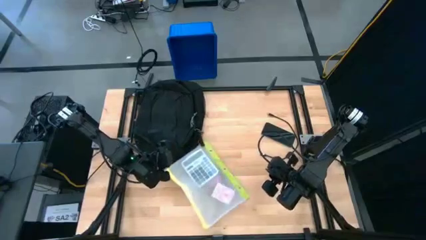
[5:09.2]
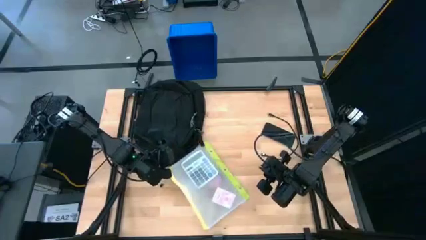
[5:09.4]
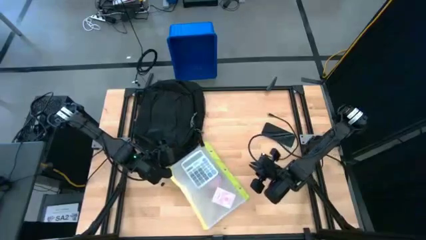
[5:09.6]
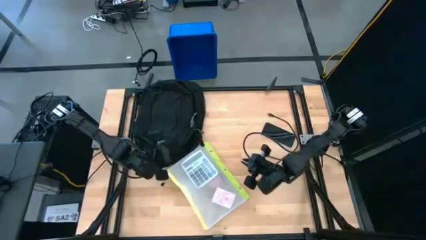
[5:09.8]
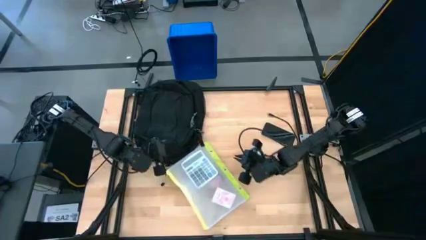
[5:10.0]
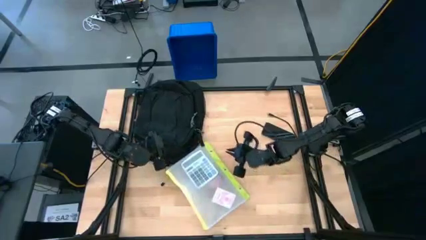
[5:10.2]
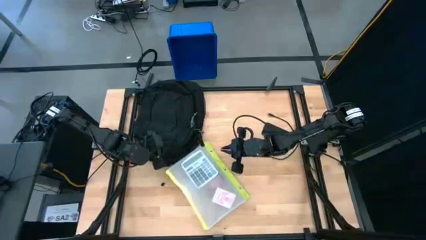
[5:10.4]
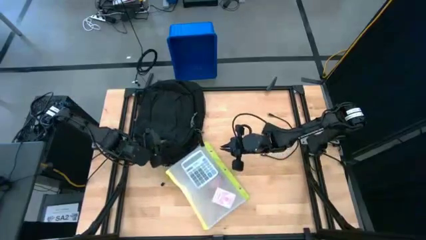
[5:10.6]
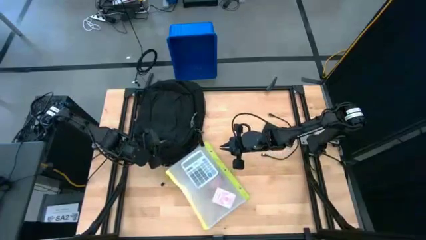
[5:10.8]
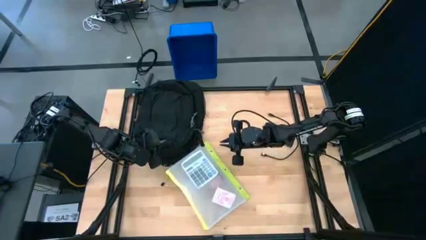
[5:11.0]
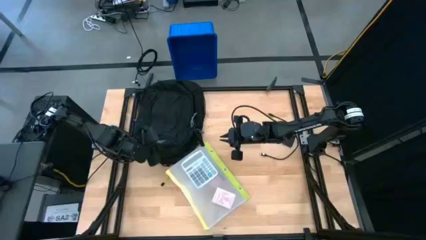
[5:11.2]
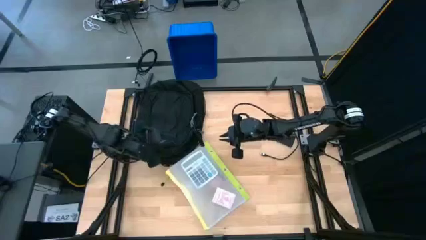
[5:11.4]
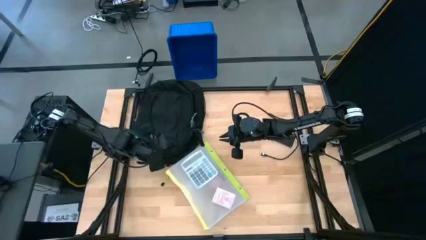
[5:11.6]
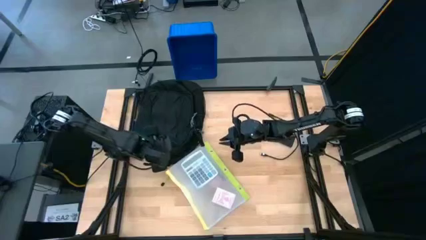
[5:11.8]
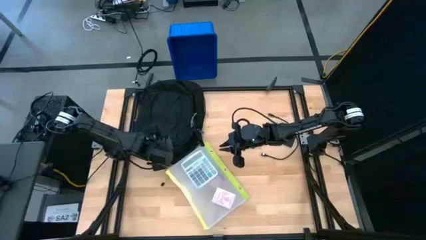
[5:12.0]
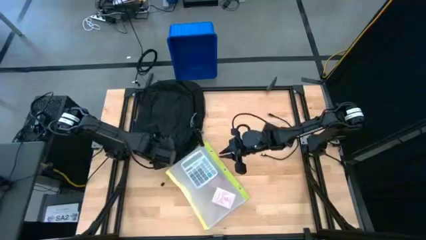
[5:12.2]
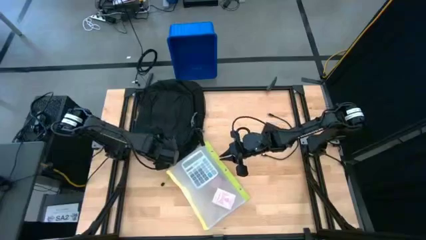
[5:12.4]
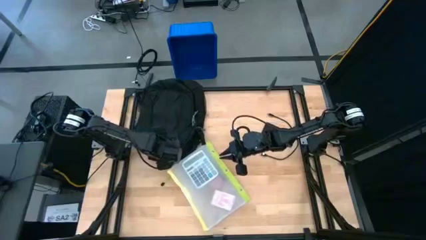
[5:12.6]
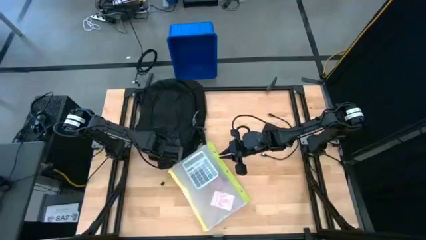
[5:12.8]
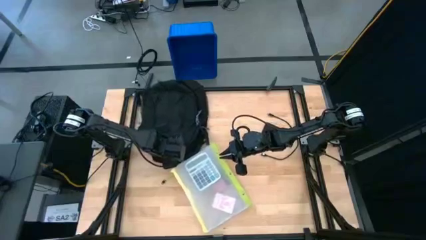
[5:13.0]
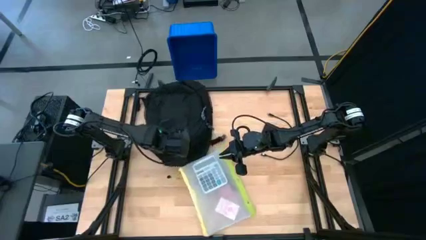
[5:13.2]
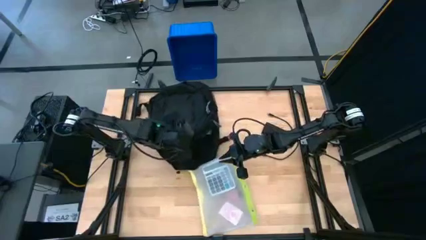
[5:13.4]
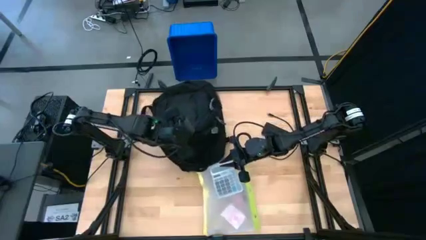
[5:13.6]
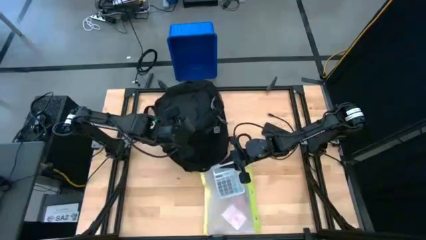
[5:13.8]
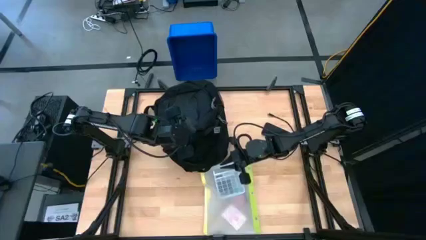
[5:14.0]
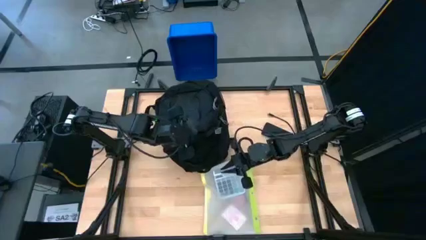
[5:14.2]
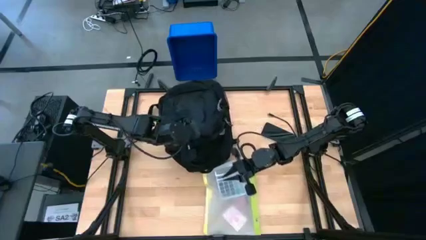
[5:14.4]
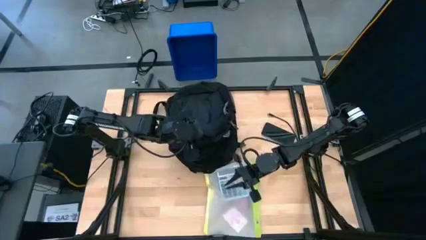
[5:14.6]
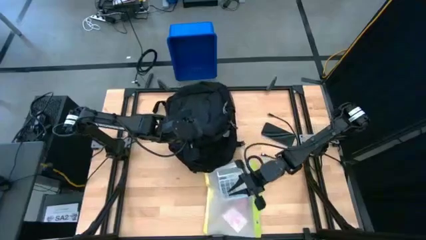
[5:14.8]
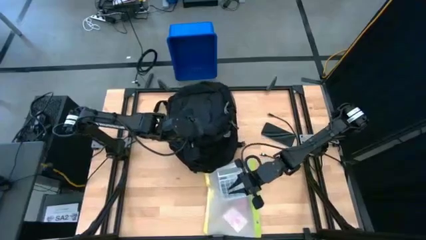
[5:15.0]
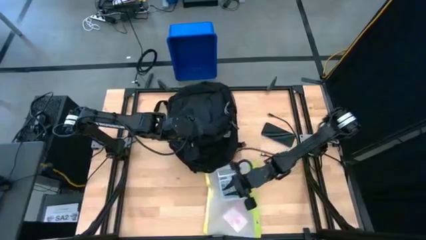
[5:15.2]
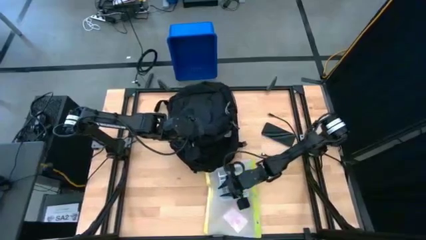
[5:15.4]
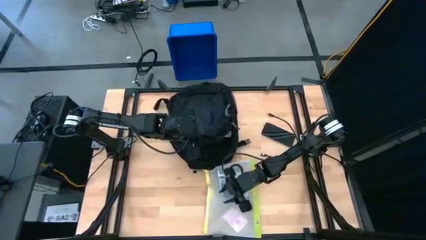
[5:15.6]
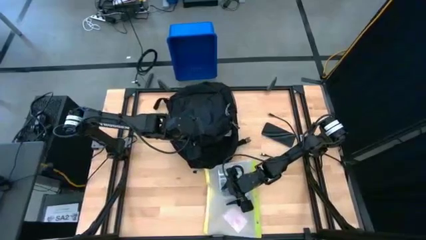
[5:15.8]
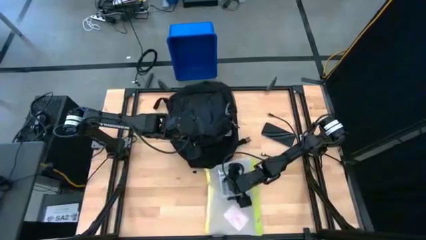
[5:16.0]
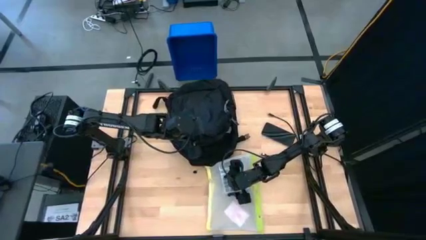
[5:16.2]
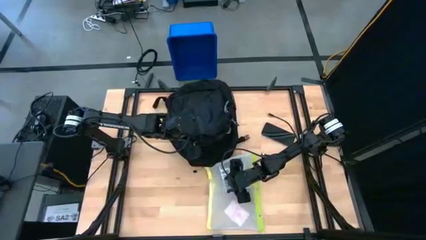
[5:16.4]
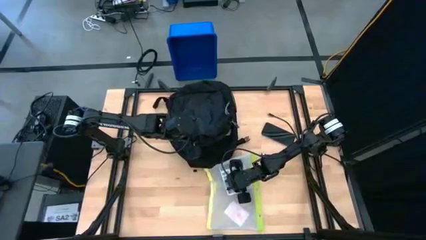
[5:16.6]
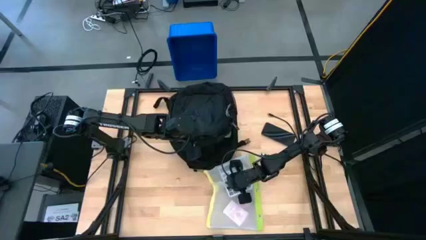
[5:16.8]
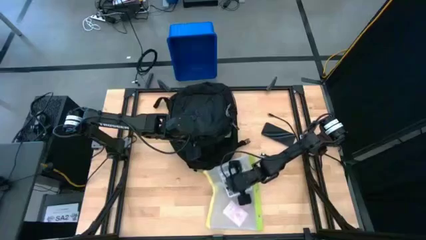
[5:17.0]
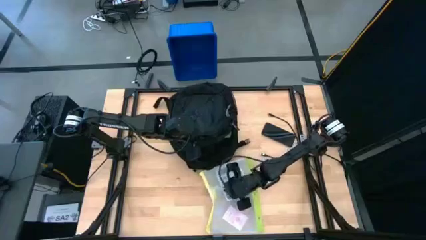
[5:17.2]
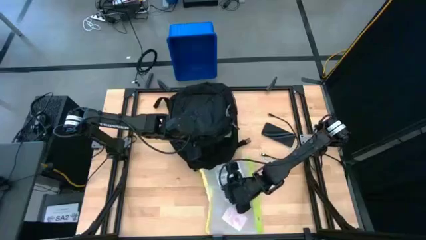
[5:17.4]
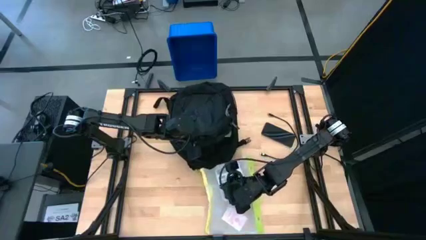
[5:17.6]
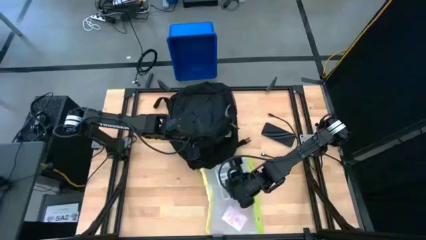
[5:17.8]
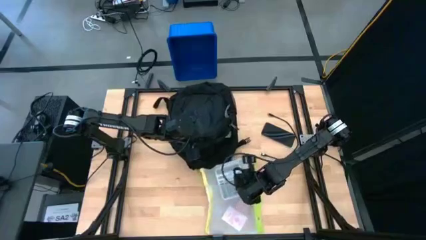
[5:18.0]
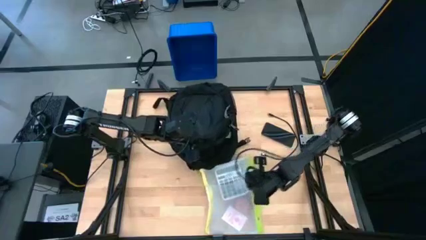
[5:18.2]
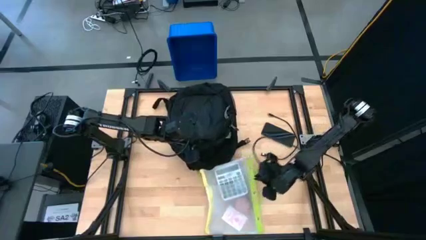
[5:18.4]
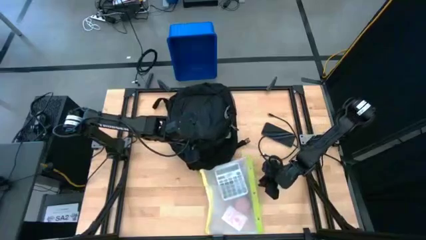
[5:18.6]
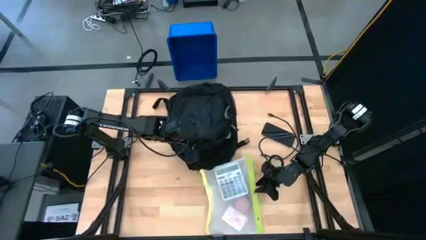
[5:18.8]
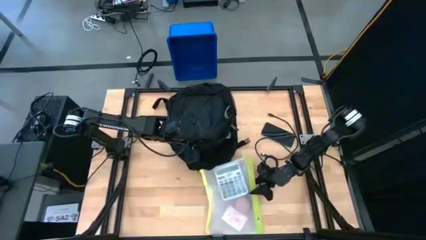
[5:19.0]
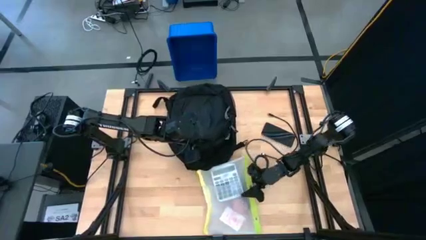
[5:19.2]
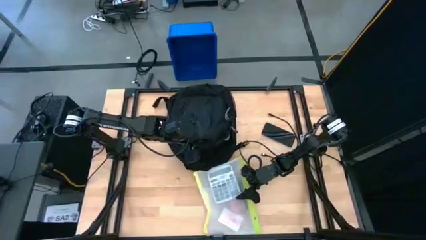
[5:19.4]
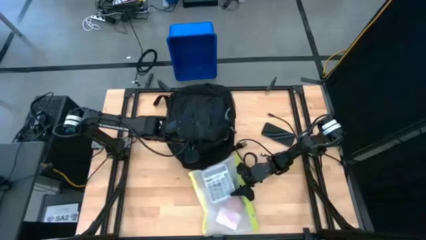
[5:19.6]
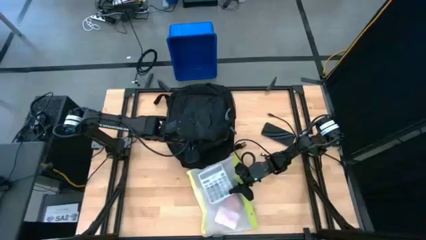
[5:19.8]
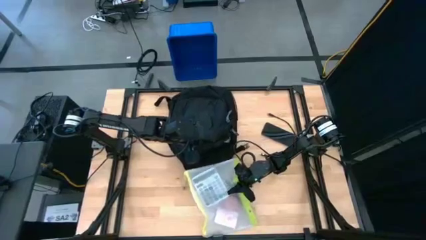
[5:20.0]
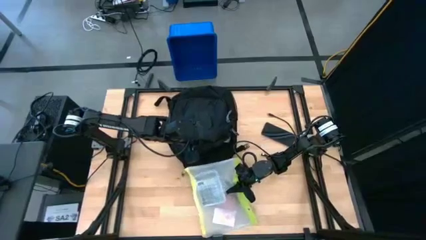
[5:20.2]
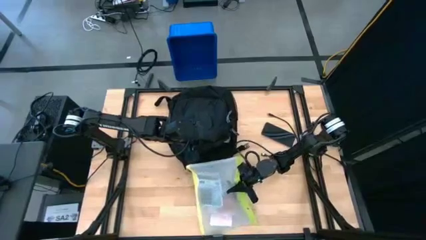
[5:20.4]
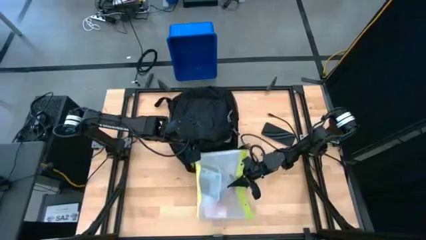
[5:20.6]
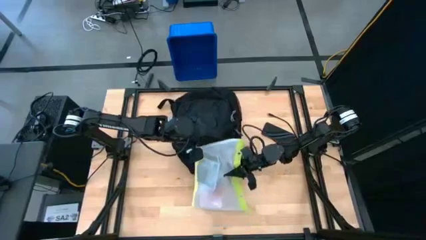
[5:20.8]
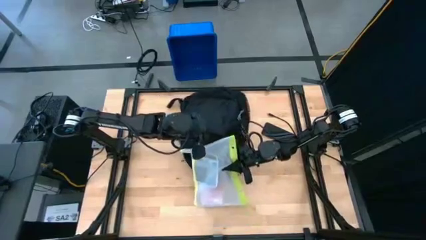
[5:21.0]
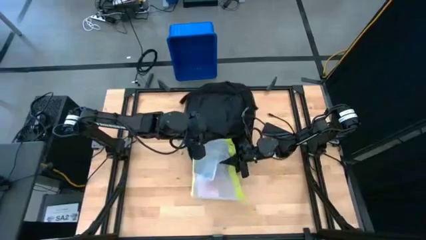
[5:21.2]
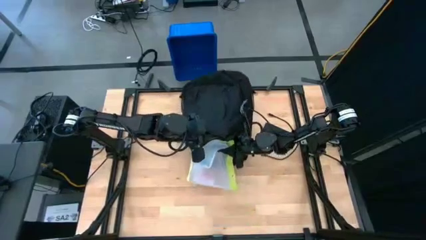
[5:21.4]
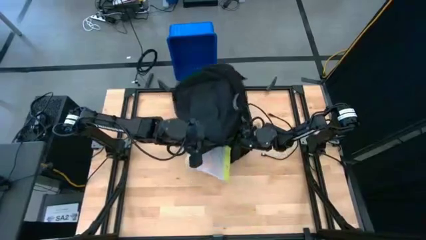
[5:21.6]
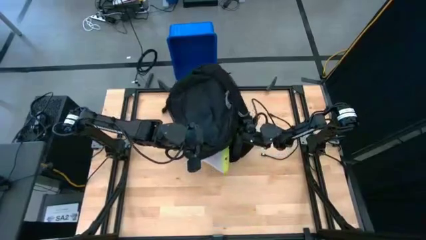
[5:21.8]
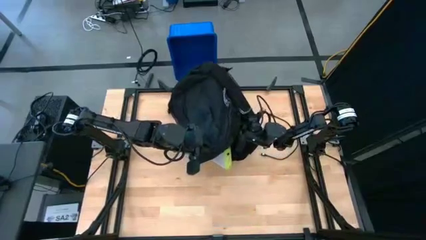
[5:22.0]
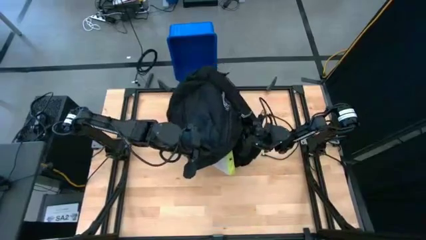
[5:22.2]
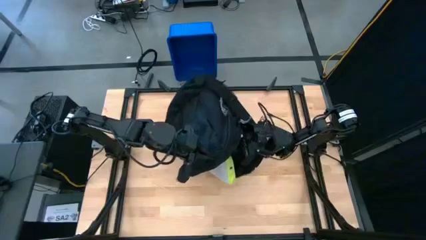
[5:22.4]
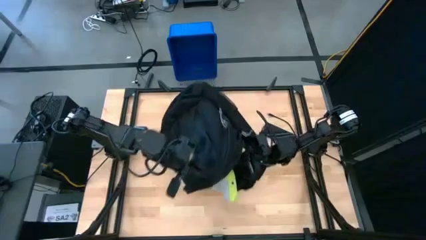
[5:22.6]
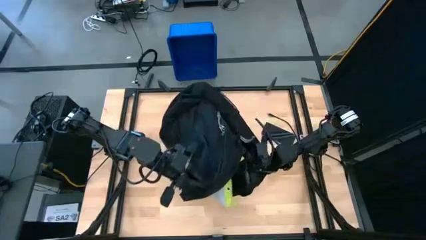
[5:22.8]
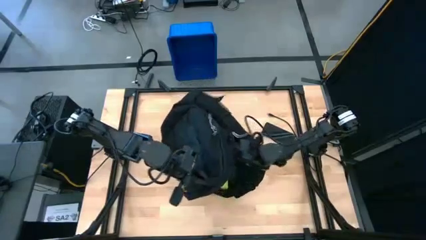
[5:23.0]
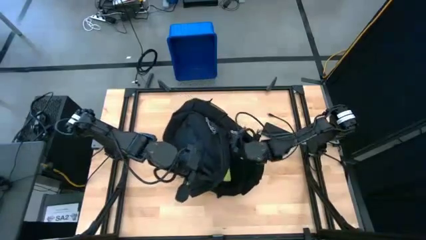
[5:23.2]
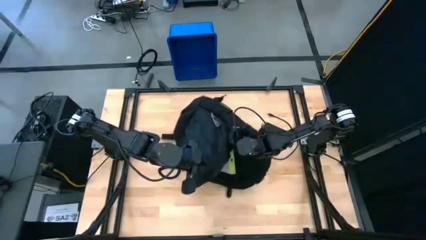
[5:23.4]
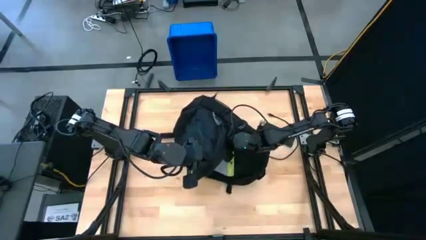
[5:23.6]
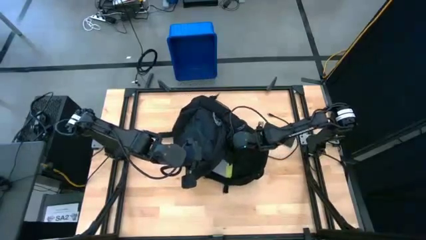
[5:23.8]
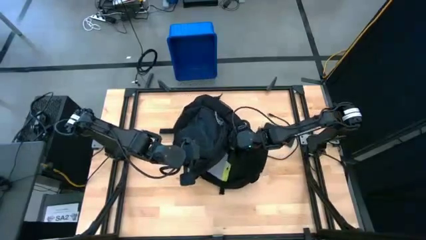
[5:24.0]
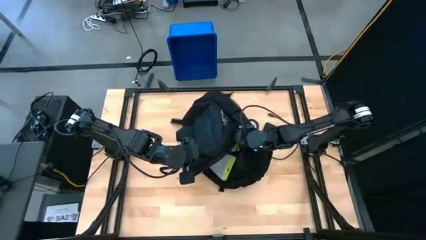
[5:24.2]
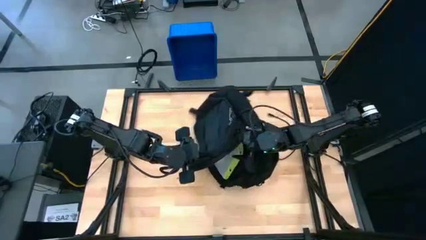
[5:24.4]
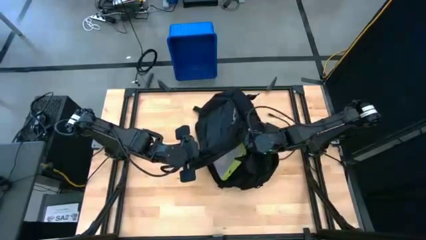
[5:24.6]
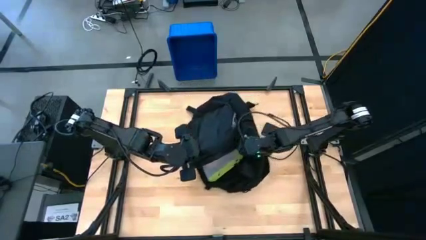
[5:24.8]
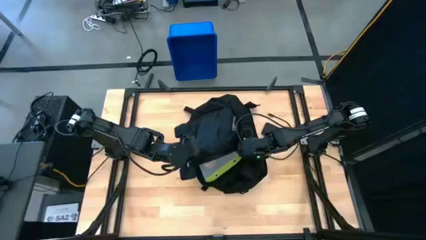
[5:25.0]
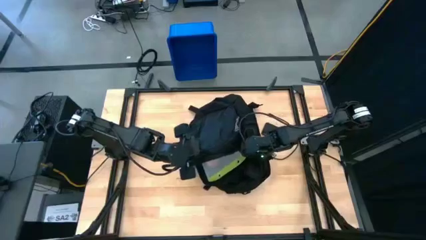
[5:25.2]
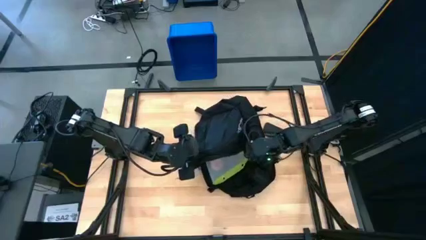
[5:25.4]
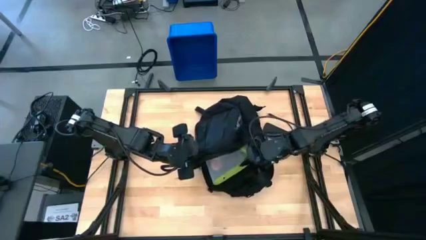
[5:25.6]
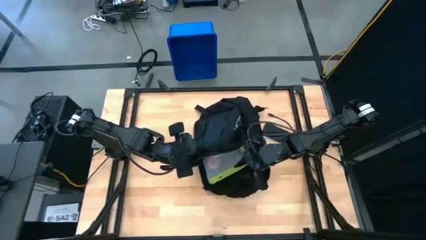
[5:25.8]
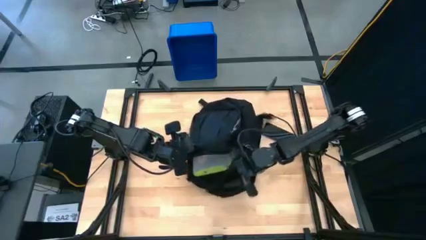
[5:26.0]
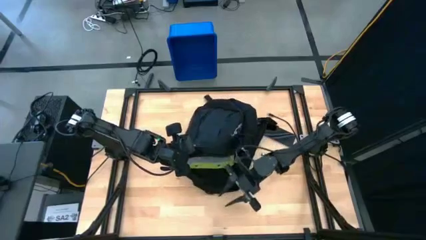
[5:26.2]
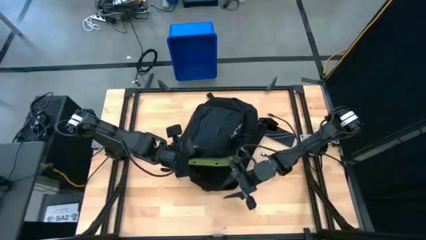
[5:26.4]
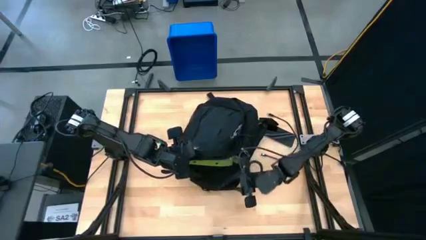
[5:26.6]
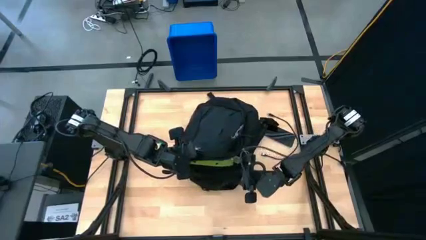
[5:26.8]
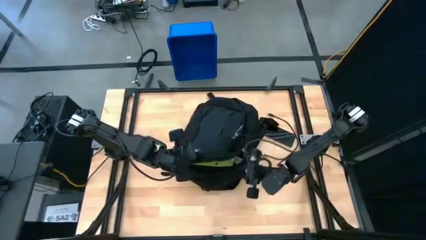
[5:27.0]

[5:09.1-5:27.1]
Task: Unpack backpack
Put the zip lock bag into the backpack
